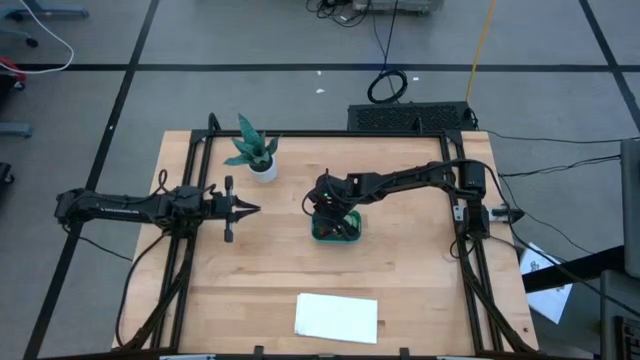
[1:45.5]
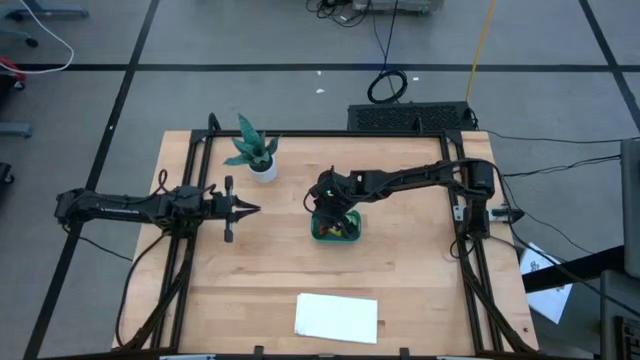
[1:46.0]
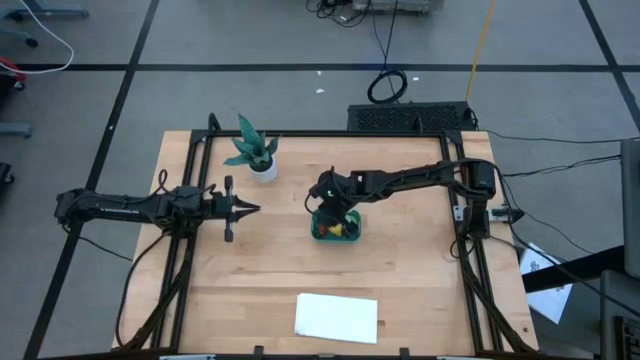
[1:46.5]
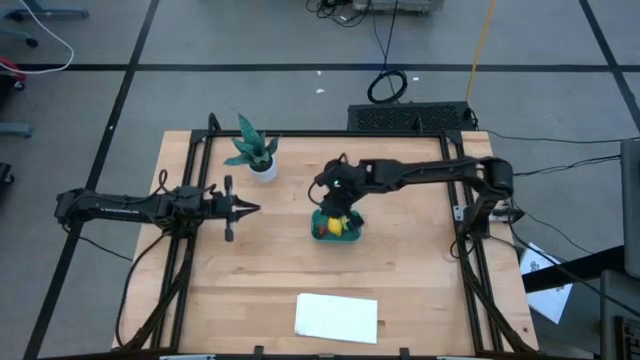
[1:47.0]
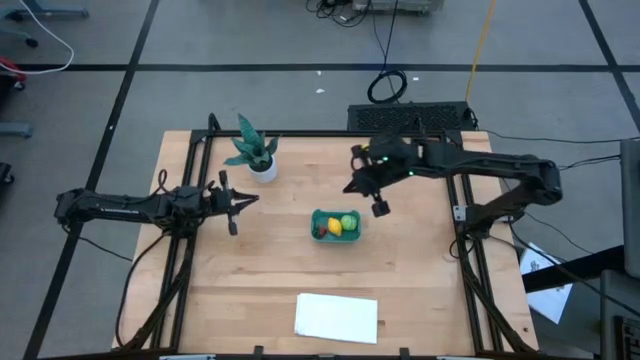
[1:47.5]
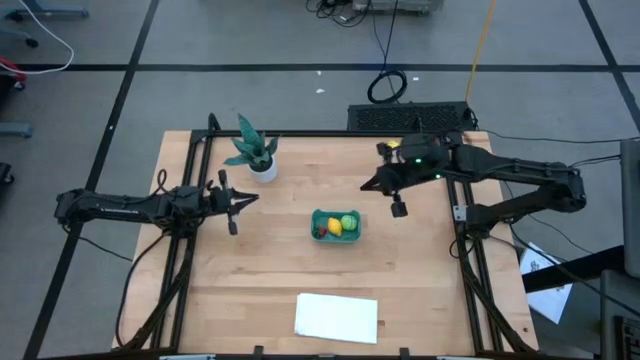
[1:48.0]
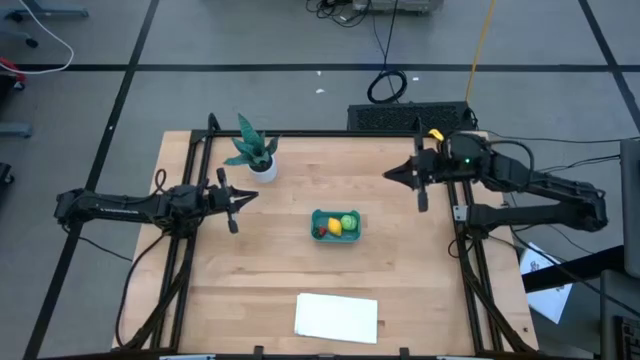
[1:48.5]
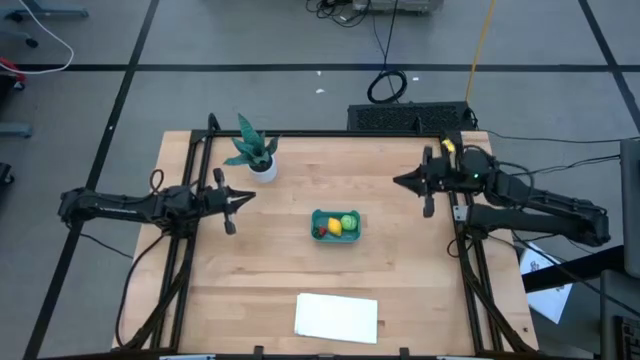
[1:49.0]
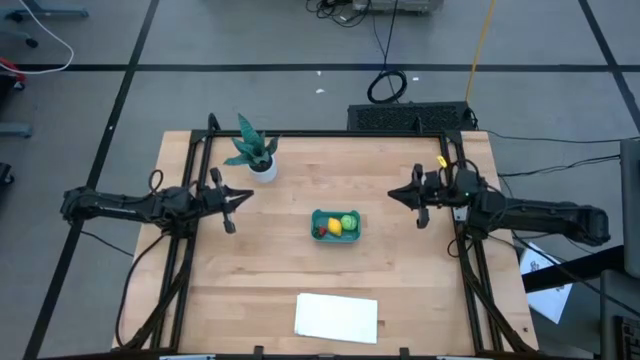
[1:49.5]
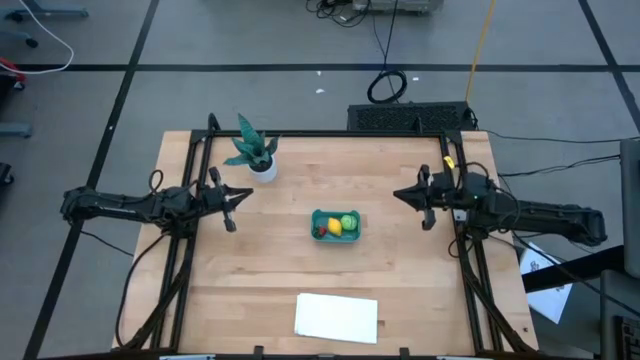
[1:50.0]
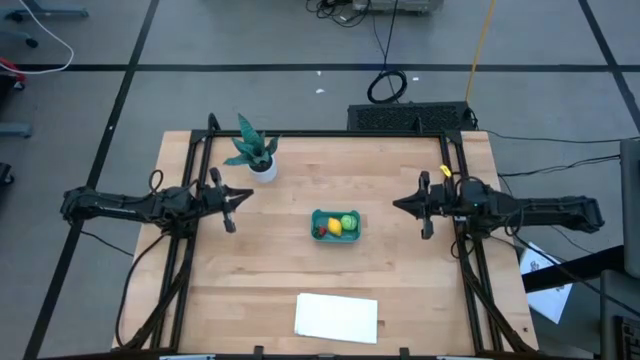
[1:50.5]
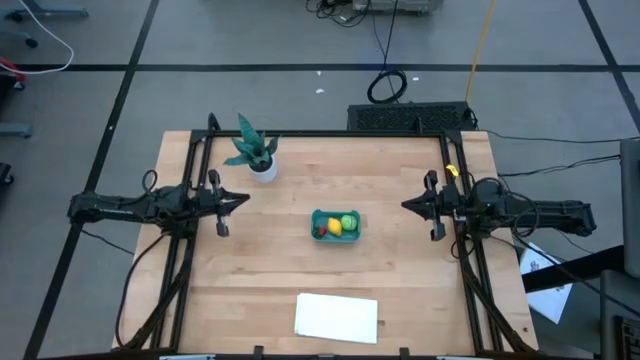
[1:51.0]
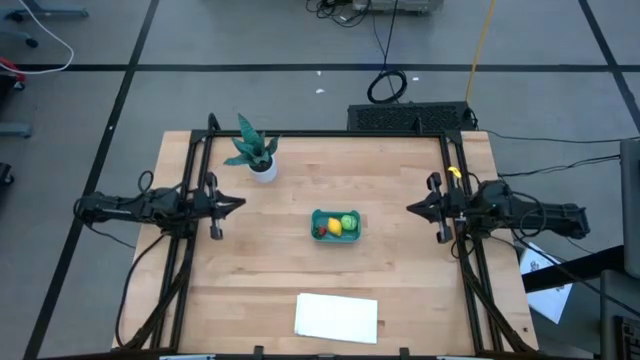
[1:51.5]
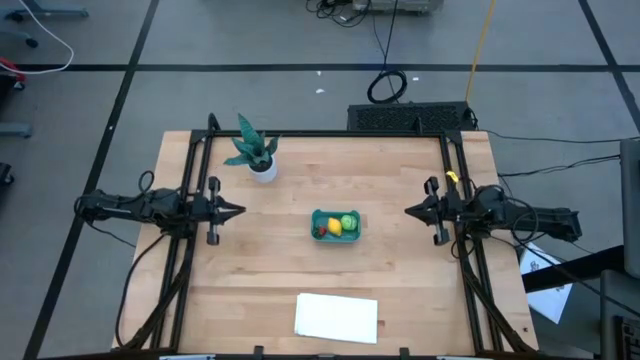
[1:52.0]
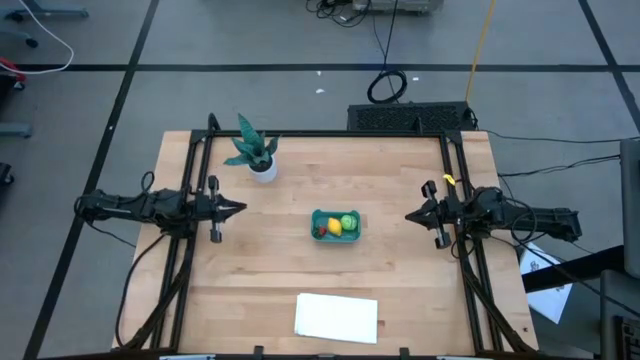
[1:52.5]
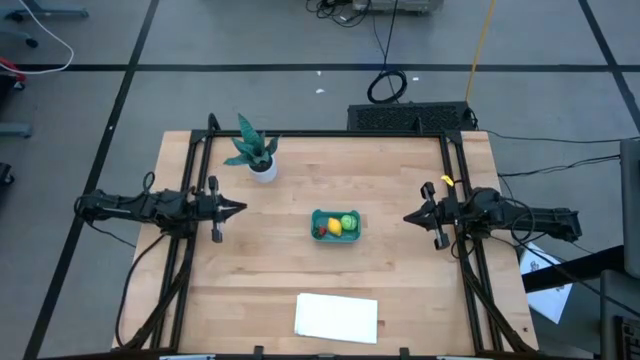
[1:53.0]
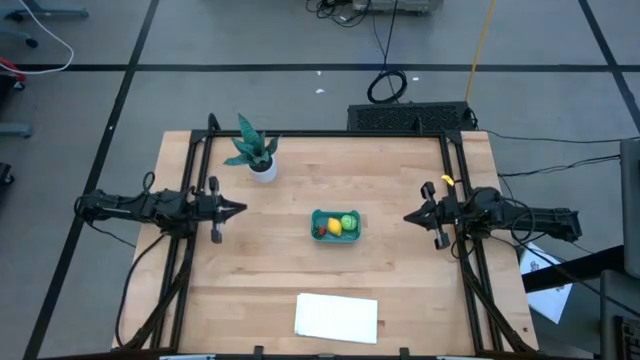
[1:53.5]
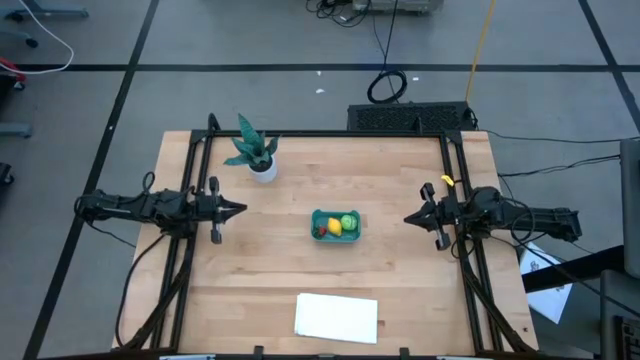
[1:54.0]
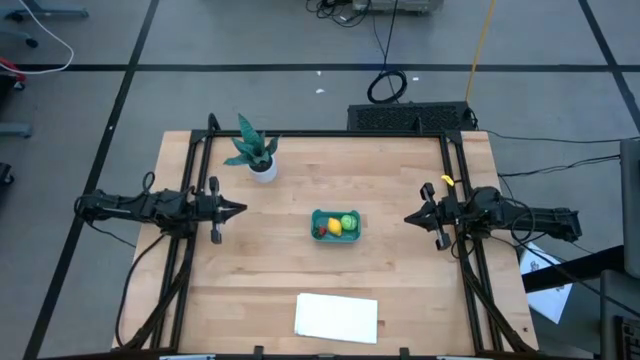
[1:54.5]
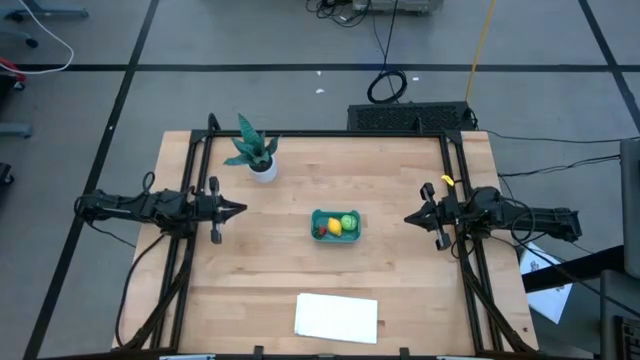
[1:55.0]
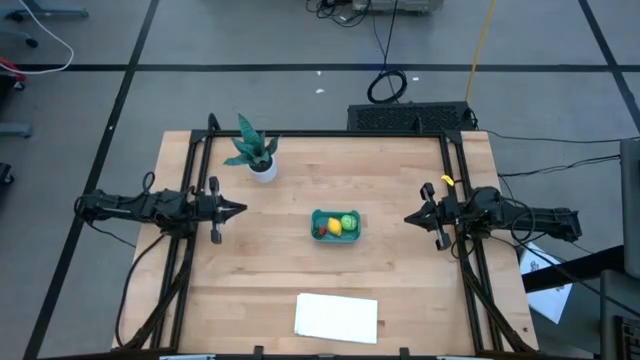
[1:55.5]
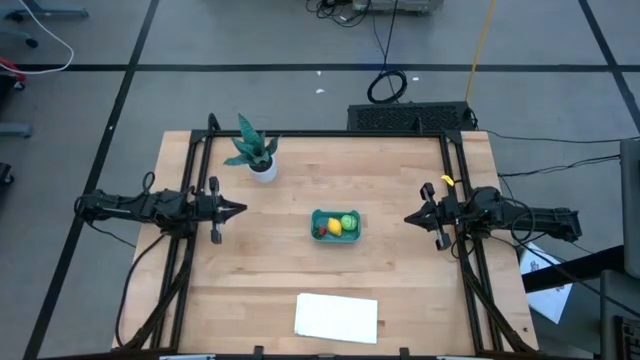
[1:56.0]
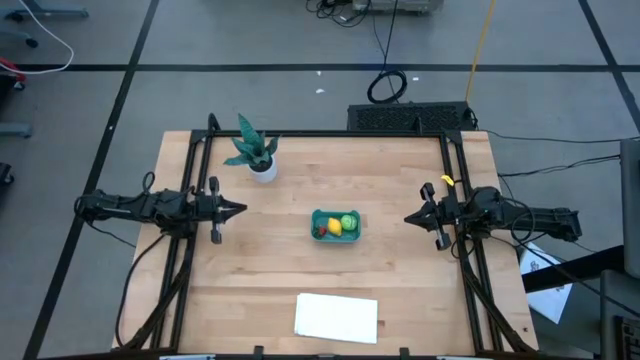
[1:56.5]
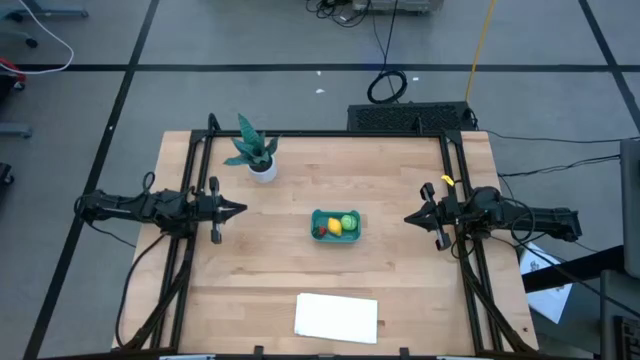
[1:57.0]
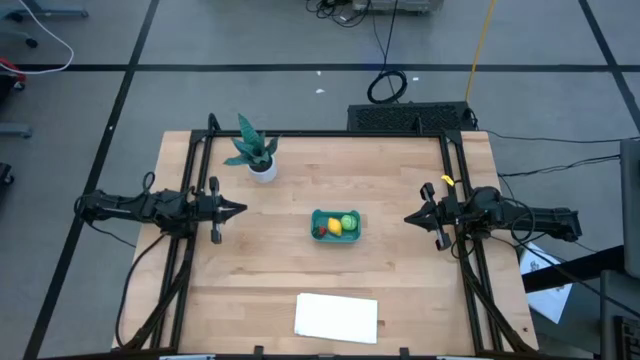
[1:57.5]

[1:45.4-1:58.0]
Task: Pick and placing Produce into tupperware
Return to Home Position

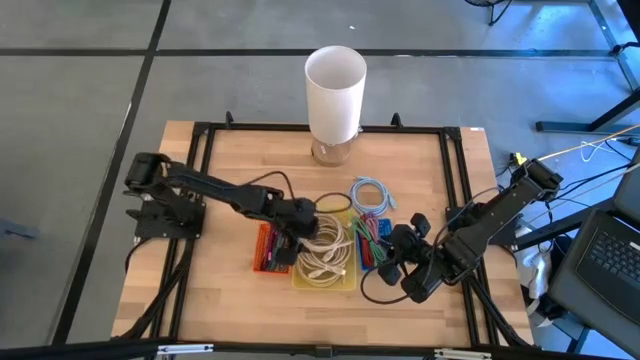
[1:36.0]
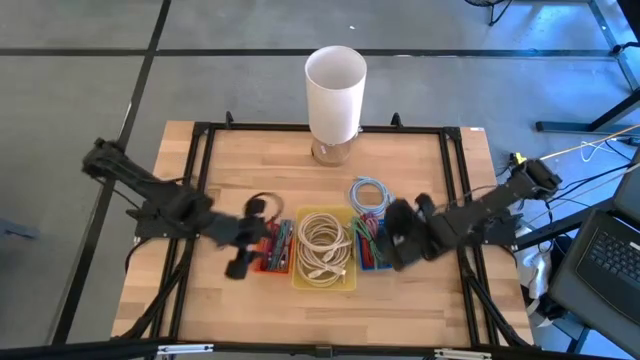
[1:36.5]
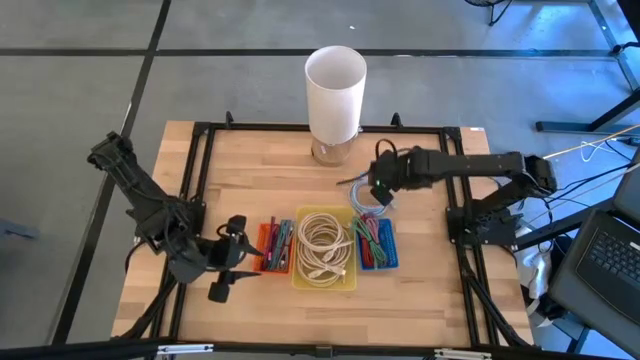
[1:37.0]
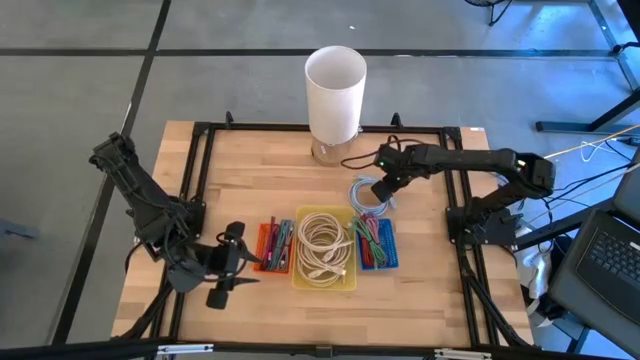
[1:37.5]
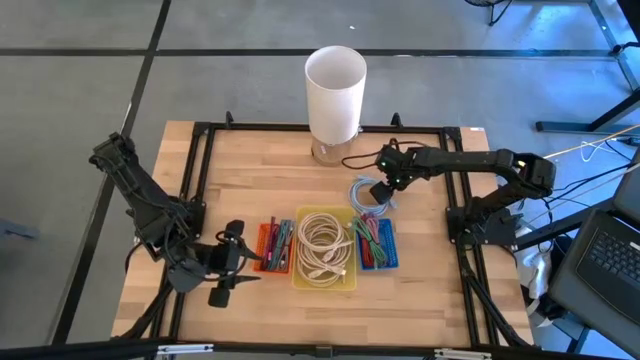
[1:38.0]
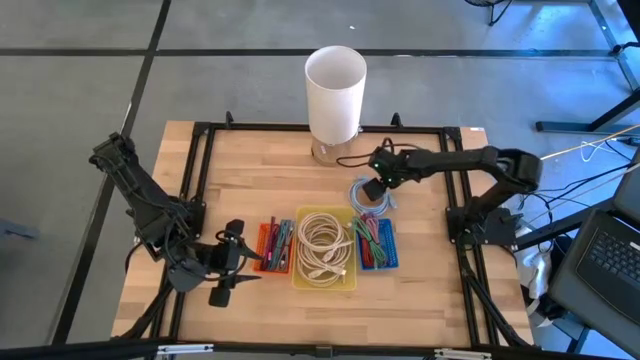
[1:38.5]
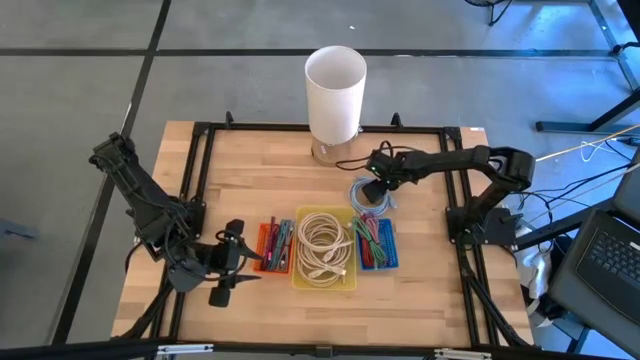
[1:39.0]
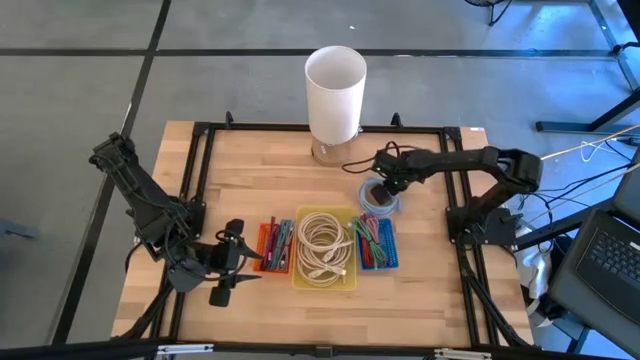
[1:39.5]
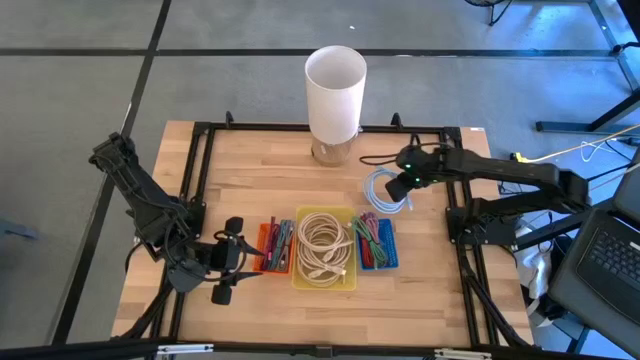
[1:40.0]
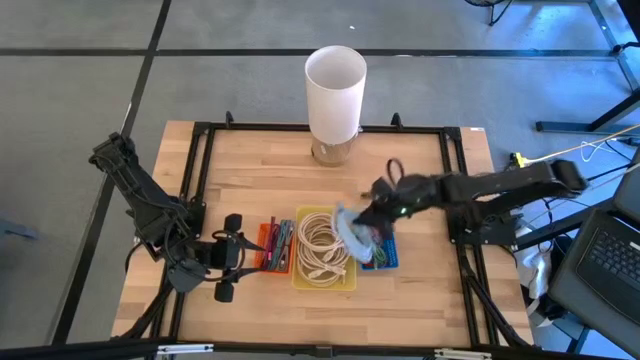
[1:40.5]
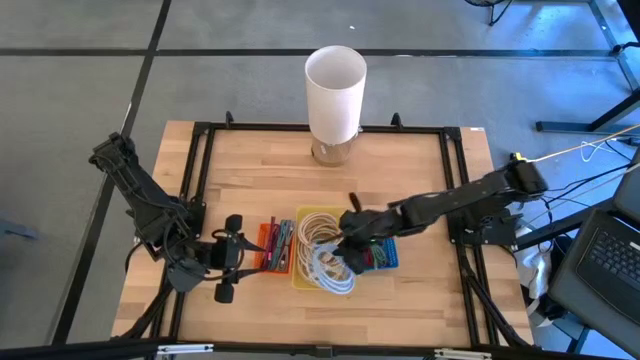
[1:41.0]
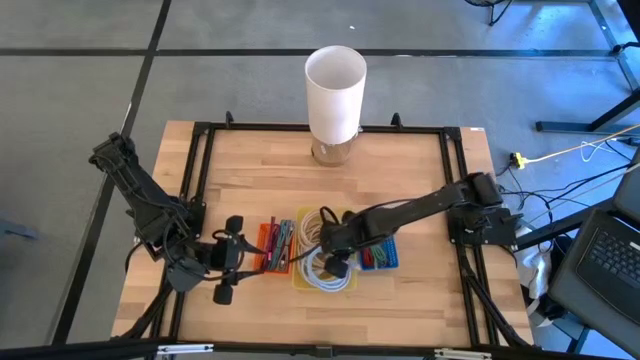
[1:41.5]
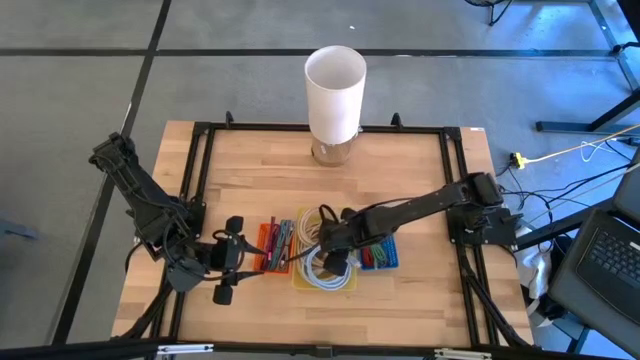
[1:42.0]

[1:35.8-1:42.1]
Task: Pick & Place USB Port
Put the blue HDMI cable into the yellow bin
